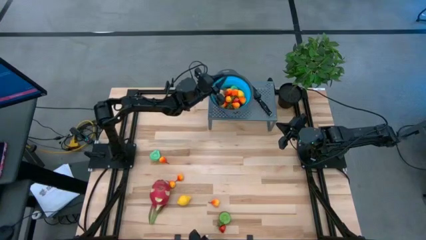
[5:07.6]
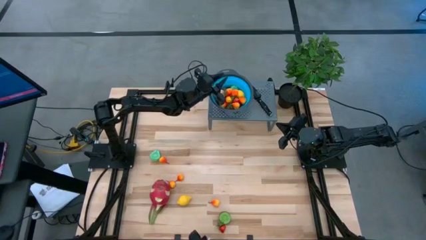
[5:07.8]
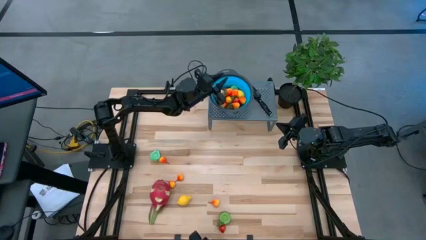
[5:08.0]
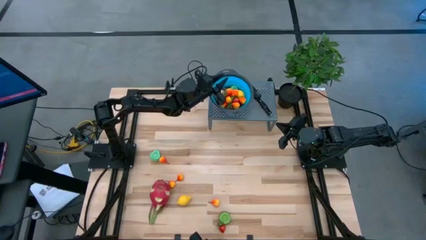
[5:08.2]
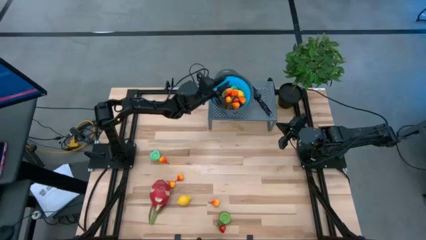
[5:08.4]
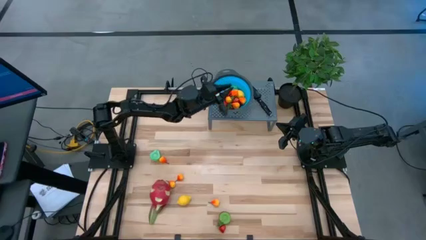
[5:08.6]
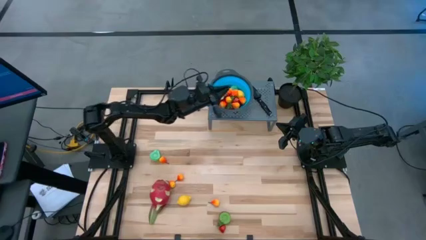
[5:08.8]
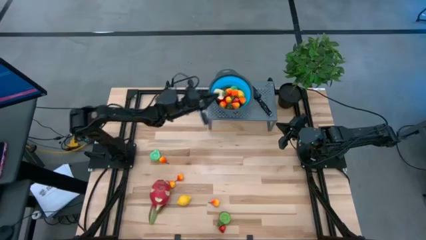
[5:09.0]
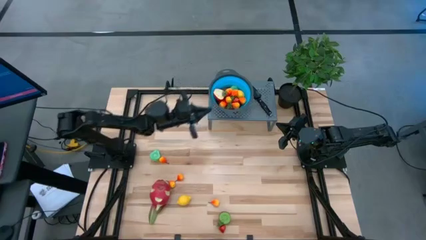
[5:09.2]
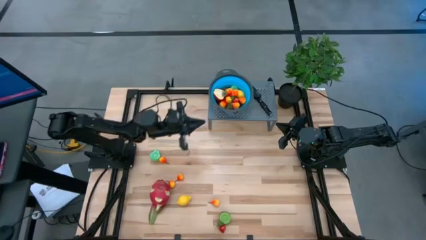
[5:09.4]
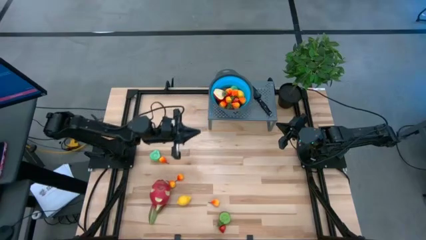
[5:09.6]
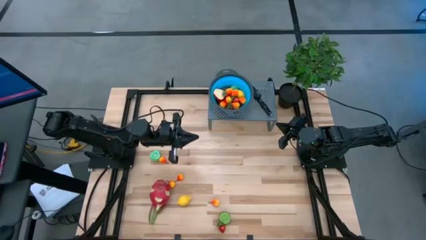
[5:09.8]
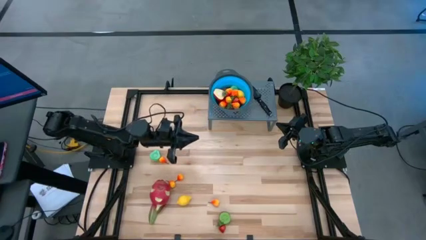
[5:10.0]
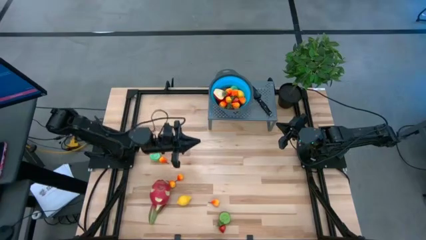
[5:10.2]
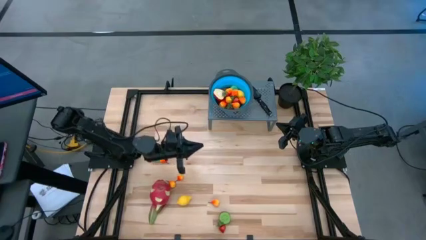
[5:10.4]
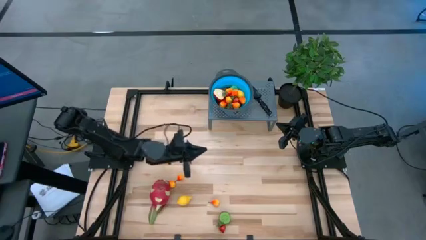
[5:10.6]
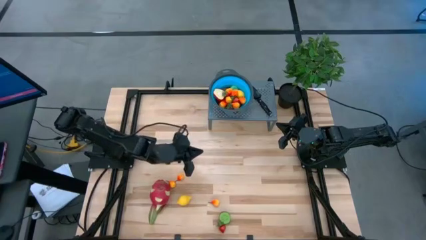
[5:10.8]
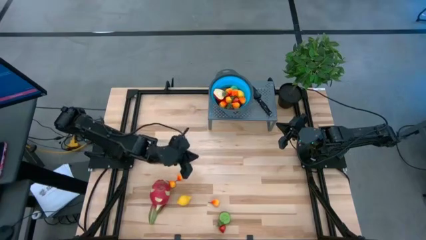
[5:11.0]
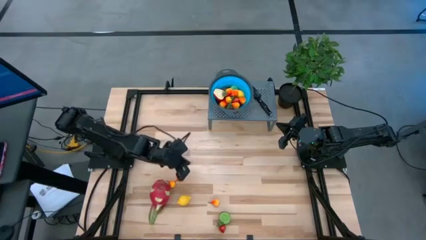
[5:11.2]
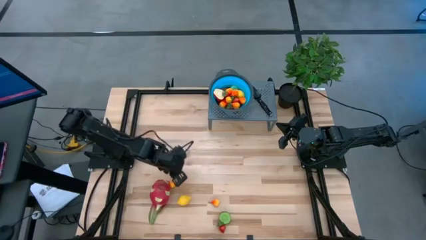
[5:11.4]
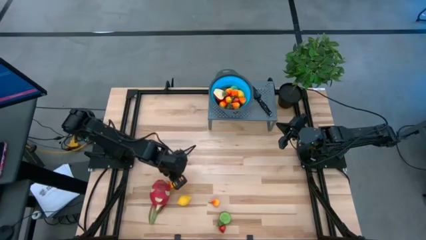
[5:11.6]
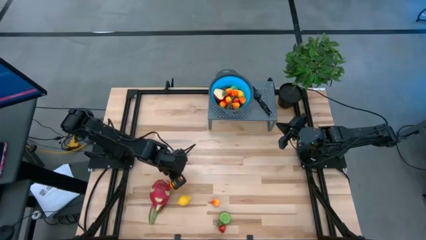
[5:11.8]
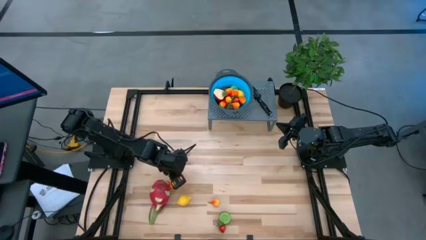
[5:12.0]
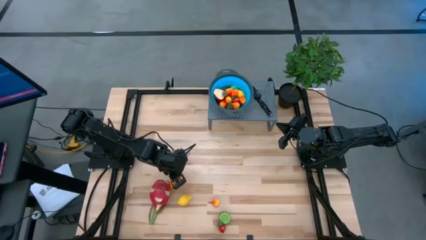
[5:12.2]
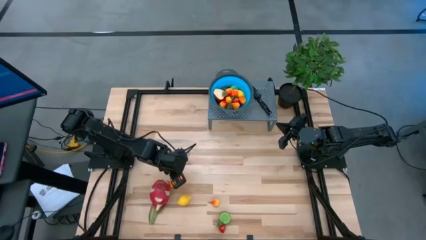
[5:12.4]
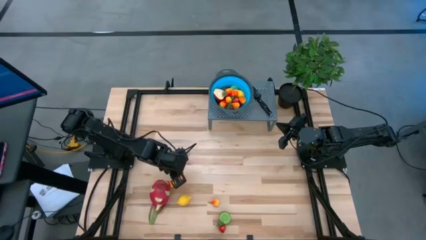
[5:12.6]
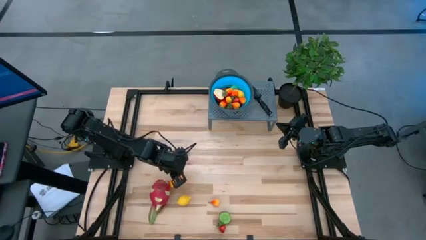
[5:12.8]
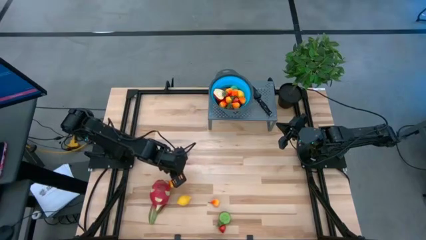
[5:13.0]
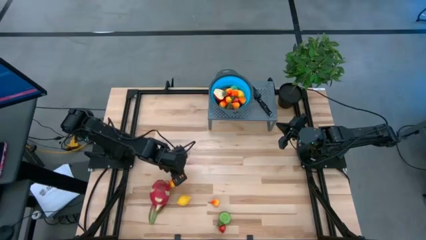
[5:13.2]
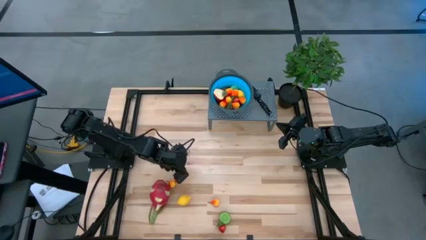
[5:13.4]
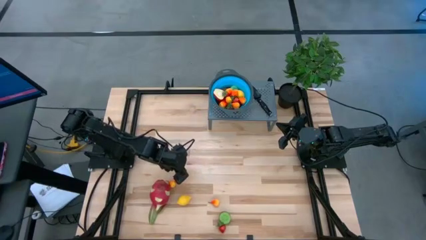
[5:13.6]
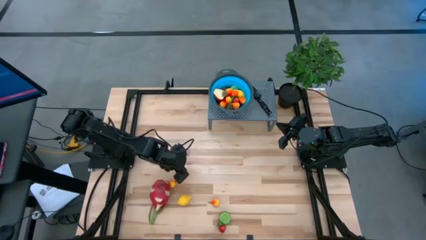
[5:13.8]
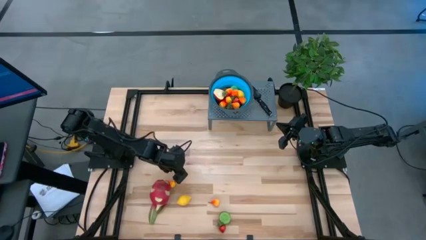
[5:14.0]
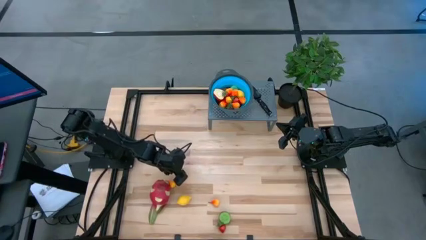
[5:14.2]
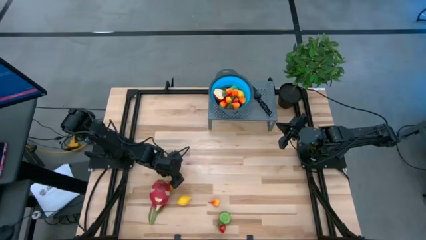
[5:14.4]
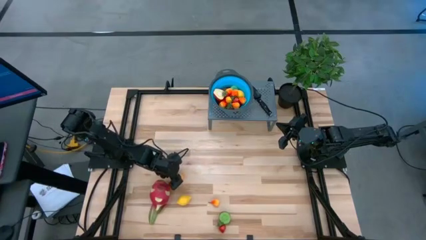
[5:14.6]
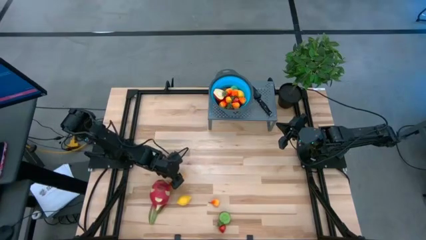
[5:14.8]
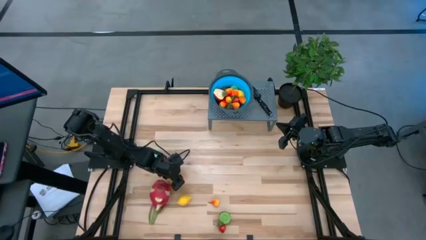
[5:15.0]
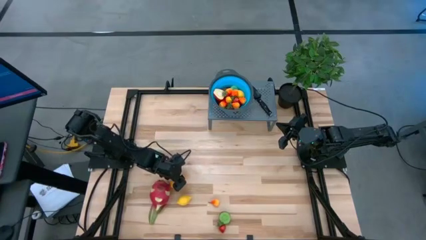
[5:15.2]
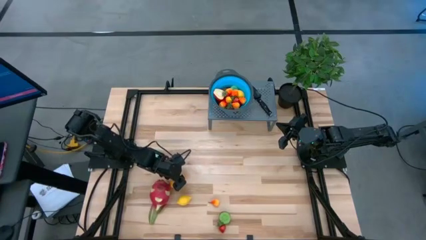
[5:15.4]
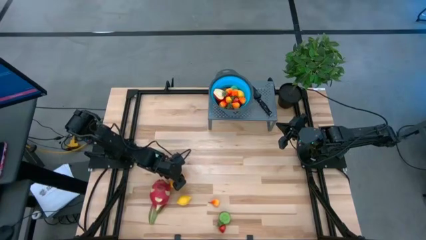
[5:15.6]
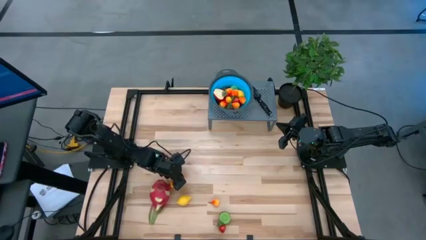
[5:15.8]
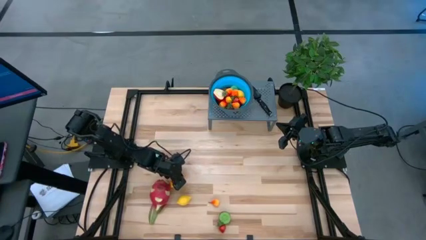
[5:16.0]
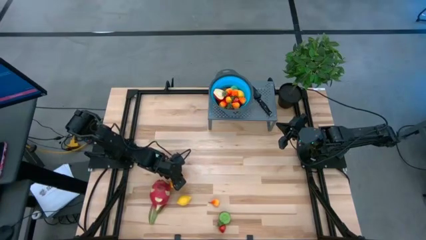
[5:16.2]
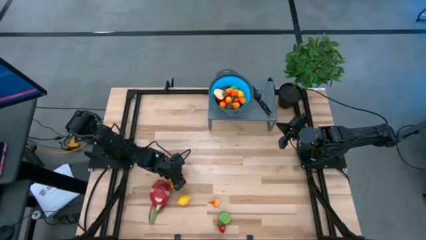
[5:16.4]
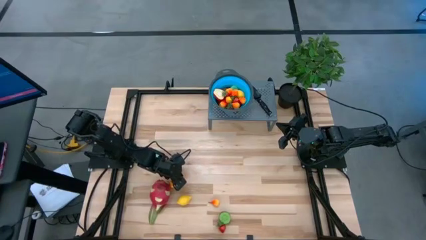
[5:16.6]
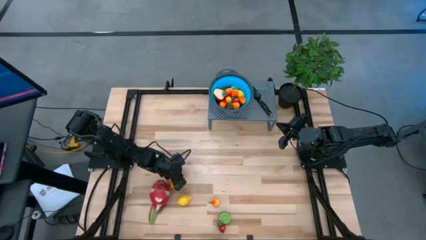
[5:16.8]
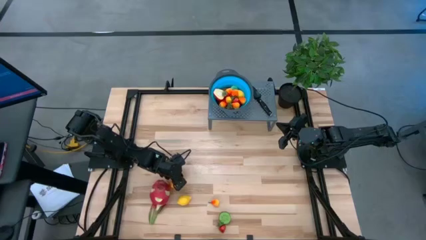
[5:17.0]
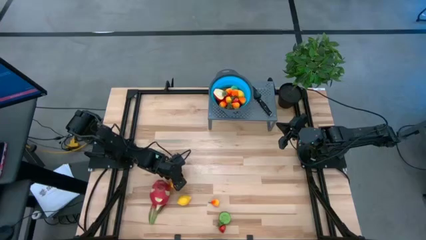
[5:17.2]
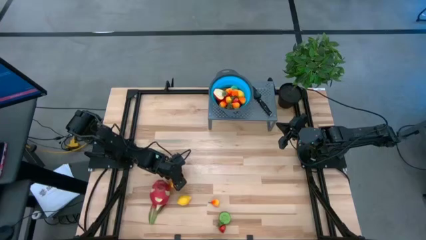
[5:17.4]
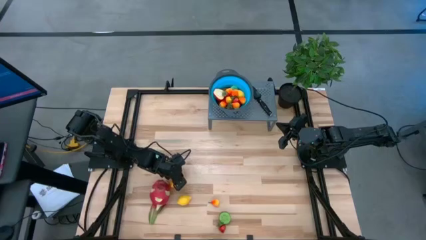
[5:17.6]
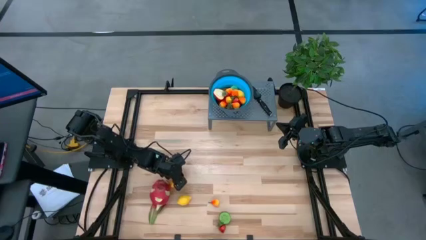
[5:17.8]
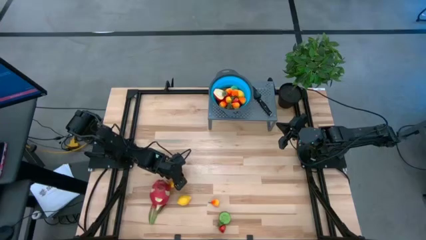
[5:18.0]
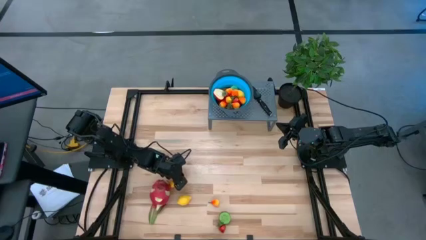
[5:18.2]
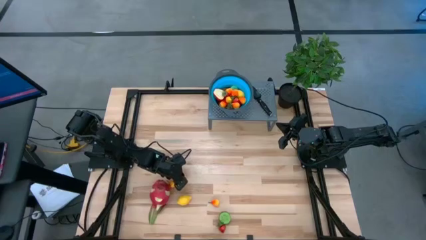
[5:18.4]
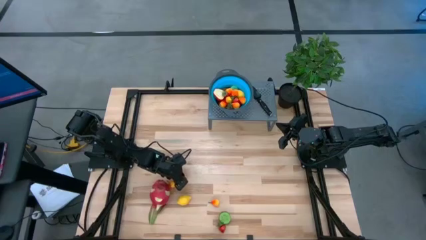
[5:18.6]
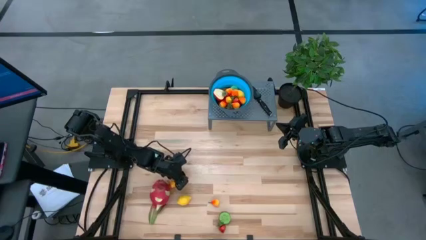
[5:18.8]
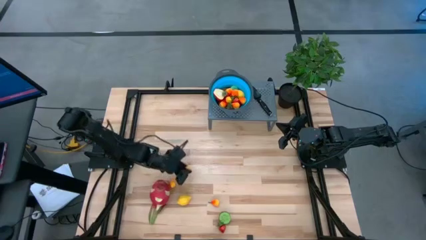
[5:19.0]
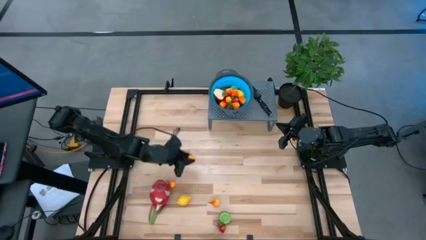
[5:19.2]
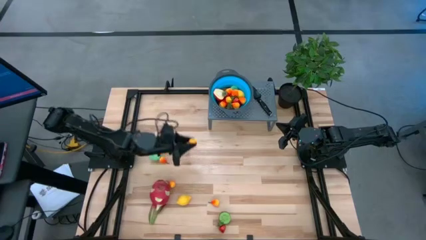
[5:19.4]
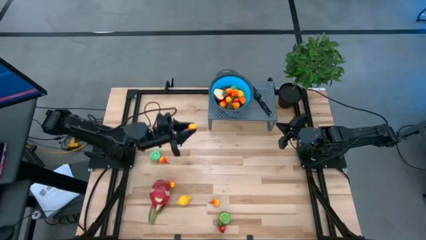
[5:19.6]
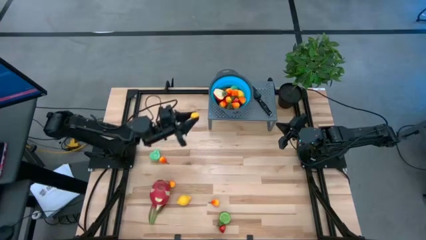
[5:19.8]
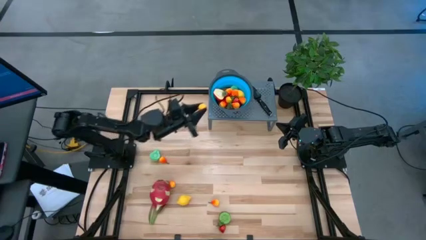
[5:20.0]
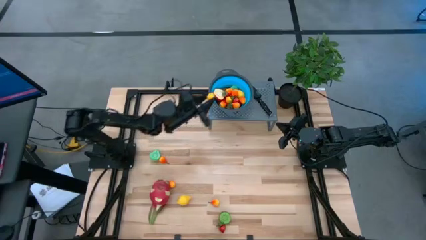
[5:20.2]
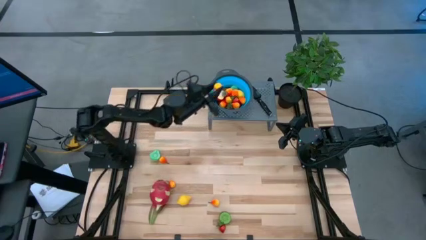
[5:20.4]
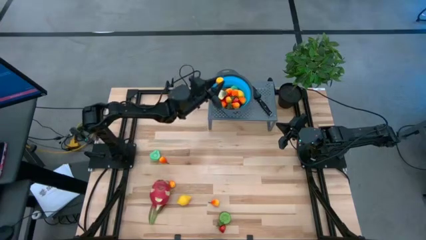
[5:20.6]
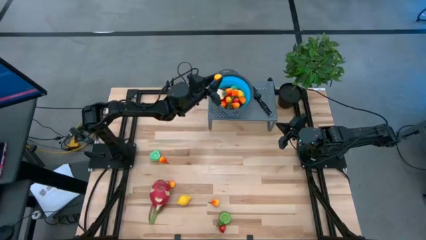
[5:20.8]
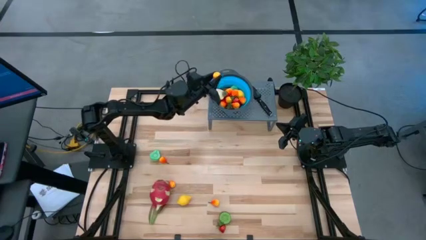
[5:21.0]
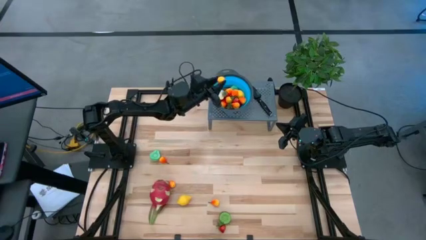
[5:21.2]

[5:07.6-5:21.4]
Task: Pick & Place Fruit
Put the yellow pear into the strainer bowl

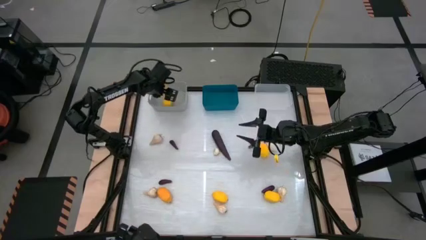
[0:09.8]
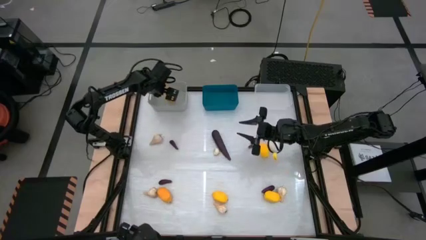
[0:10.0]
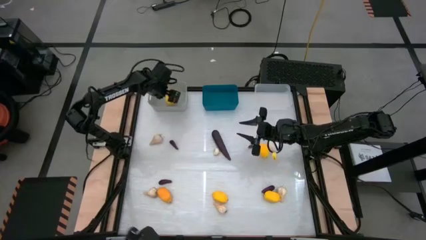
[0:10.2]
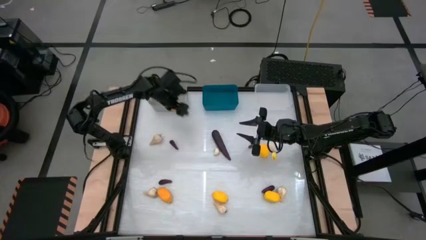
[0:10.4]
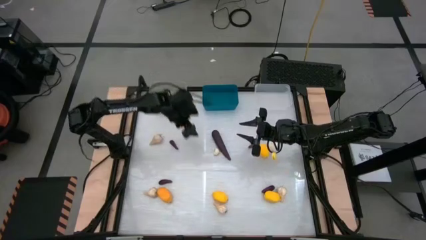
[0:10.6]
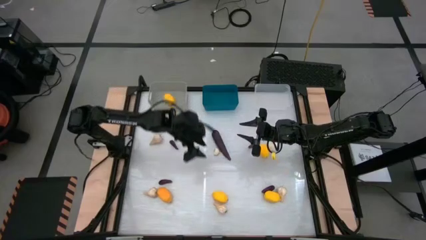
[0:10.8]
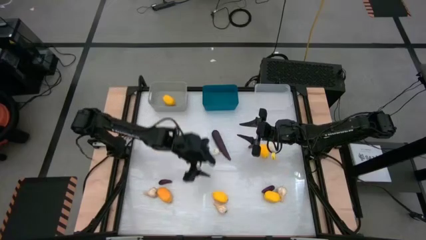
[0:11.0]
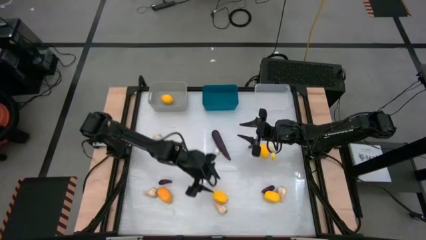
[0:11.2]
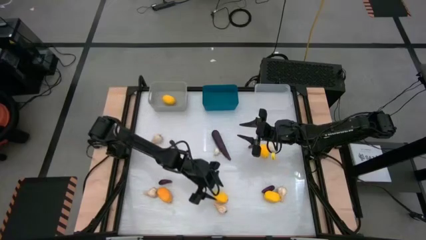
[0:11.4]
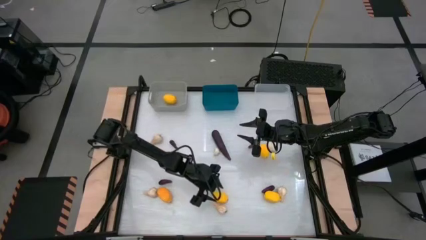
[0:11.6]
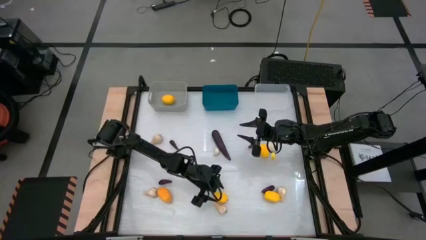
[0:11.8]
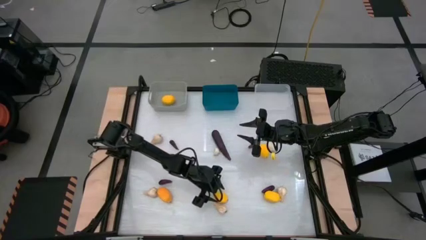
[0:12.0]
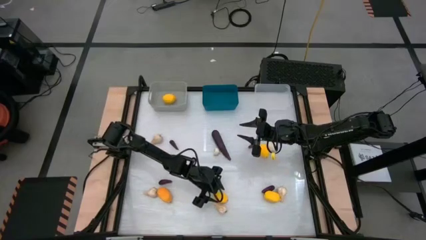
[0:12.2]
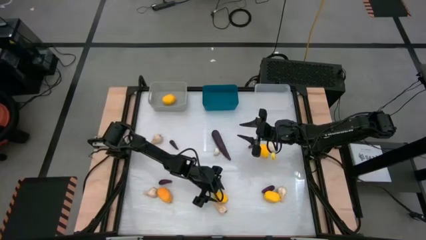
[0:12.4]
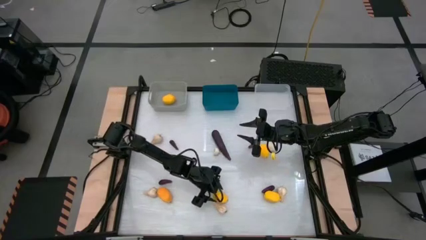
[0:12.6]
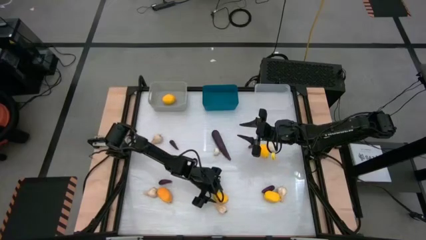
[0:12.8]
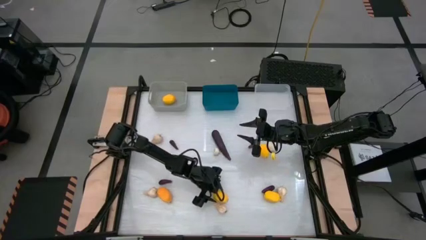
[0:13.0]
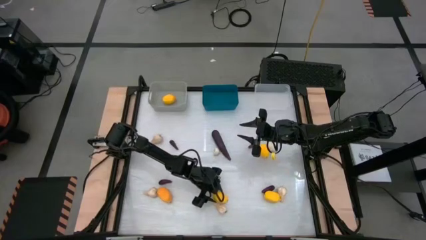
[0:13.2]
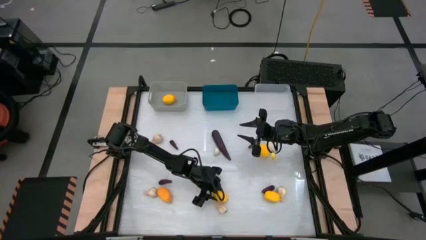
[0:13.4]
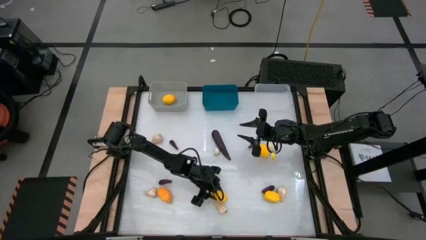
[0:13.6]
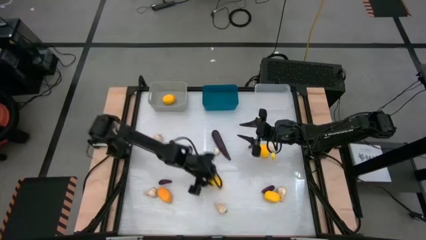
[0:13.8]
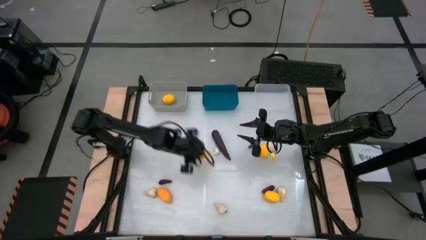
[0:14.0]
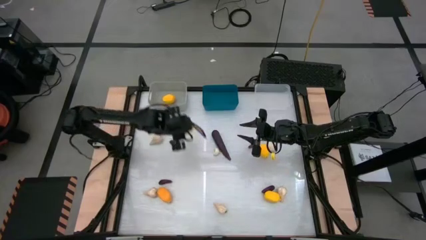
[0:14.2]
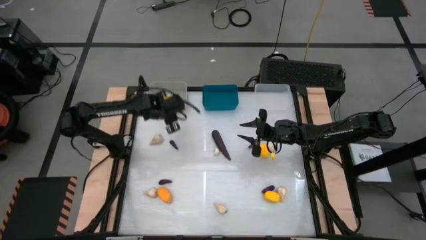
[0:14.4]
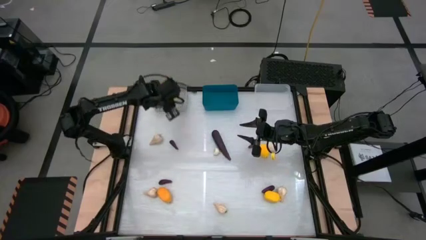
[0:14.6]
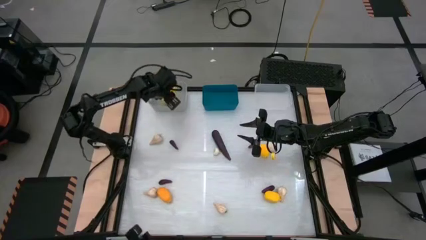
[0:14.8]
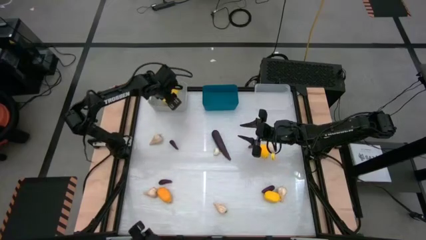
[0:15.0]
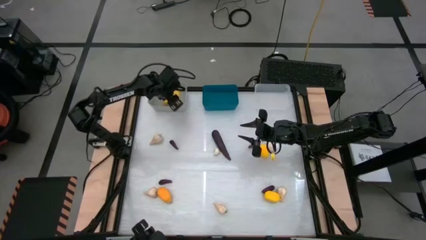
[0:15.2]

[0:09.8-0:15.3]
Task: Sort produce into baskets
Put the bottom center lemon into the gray bin
